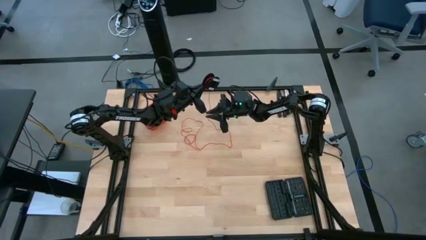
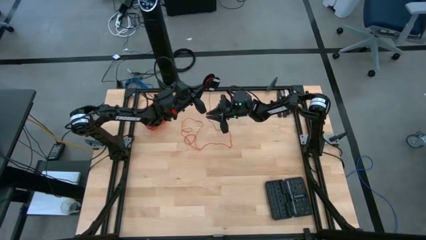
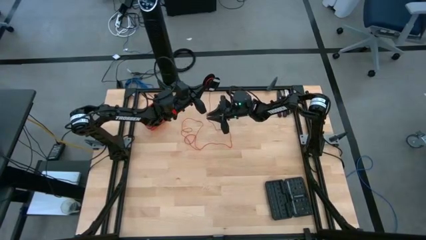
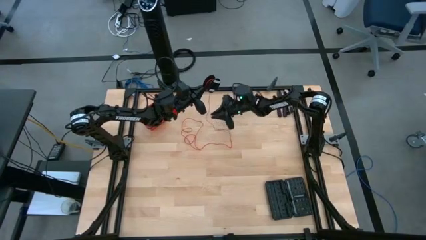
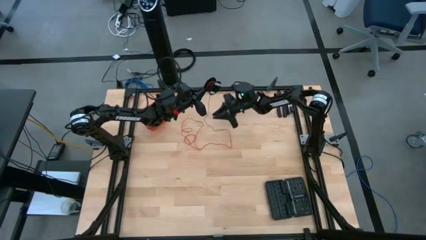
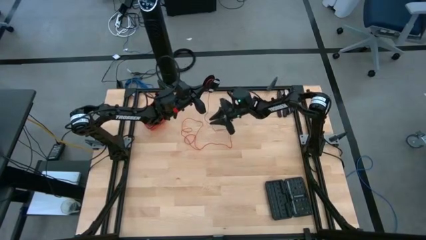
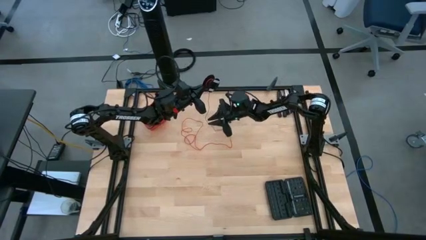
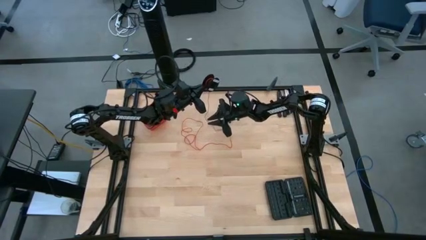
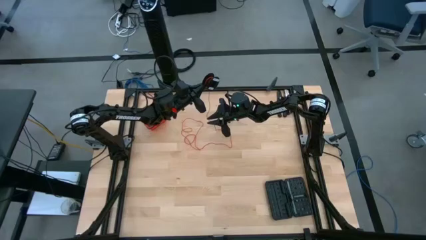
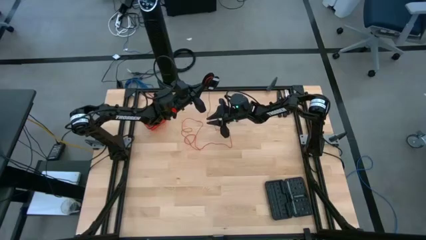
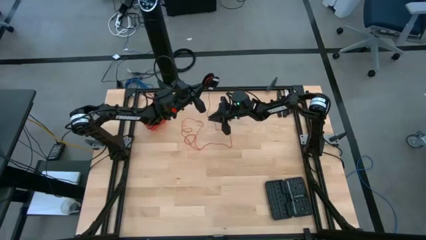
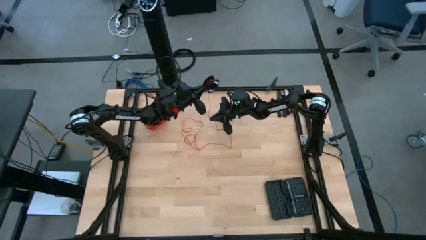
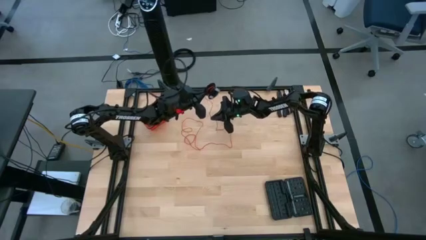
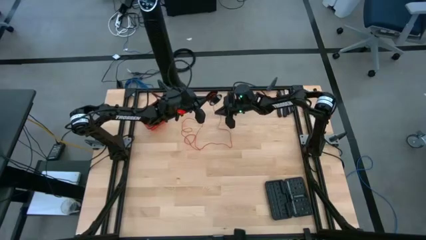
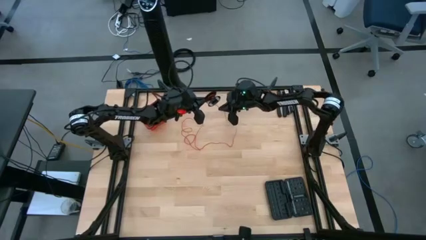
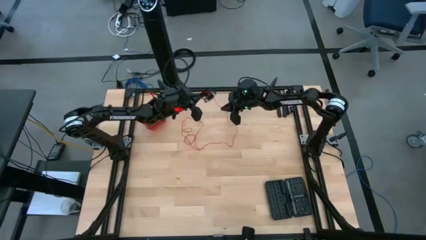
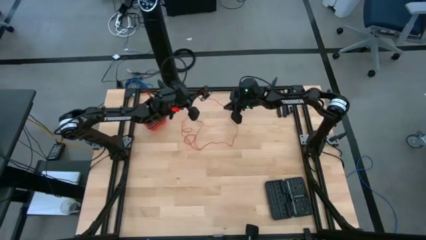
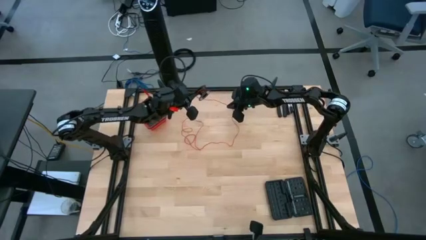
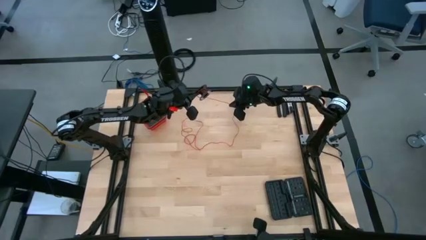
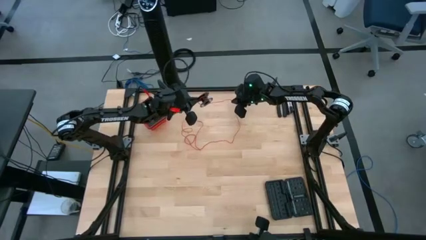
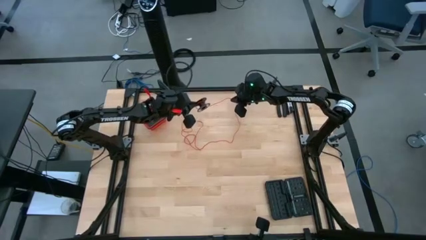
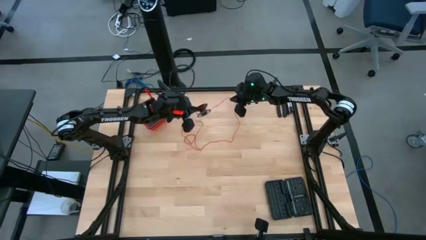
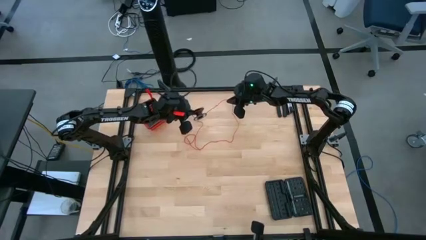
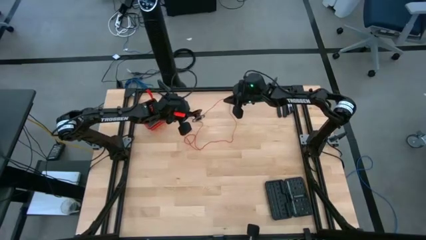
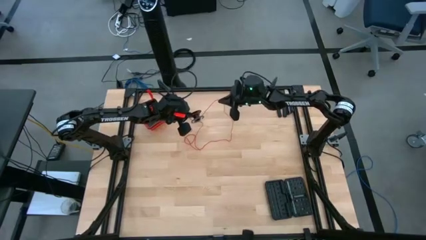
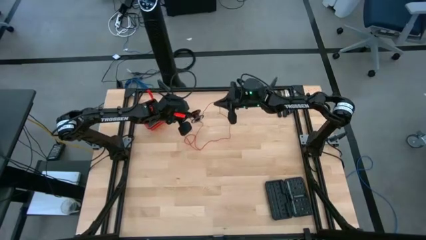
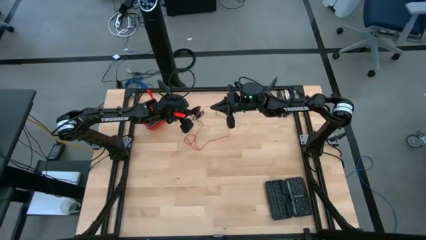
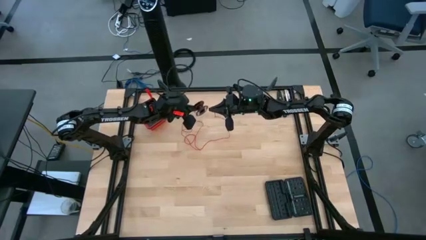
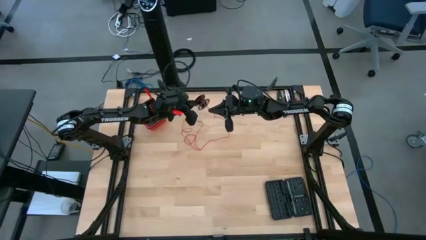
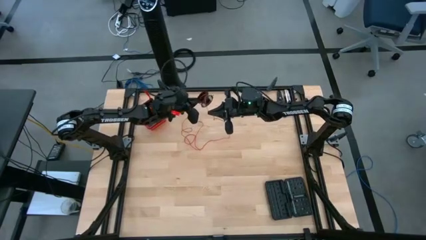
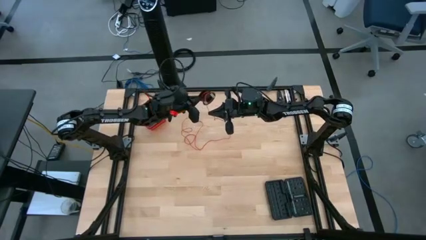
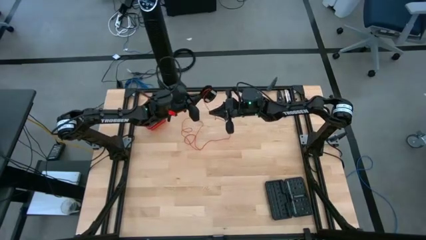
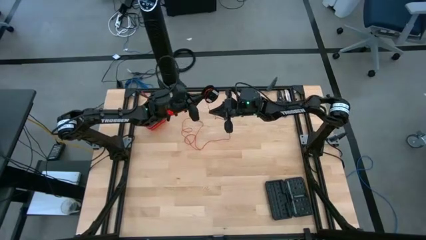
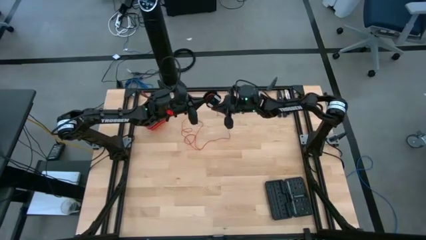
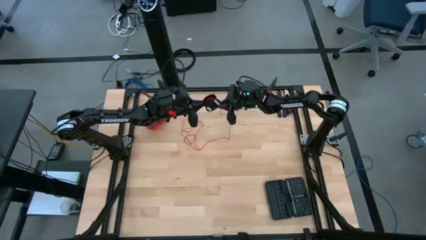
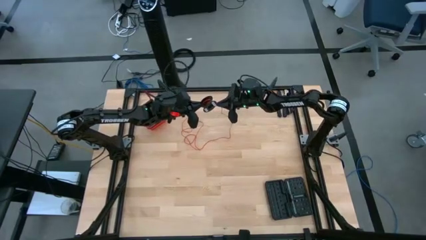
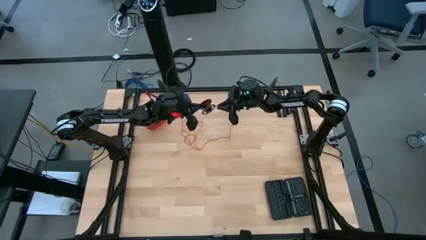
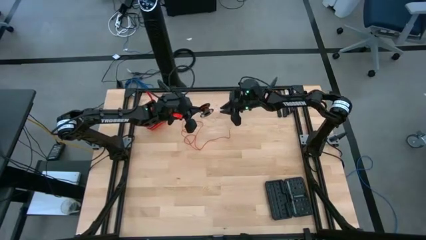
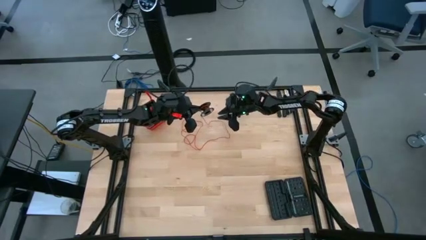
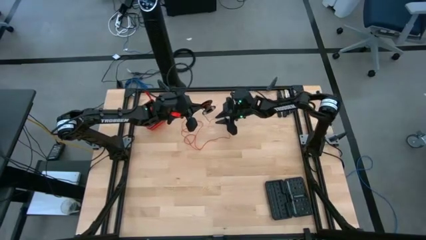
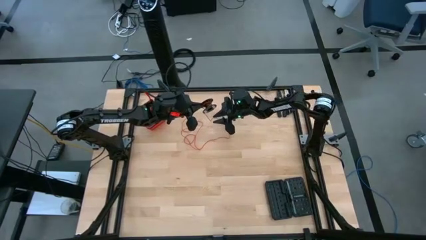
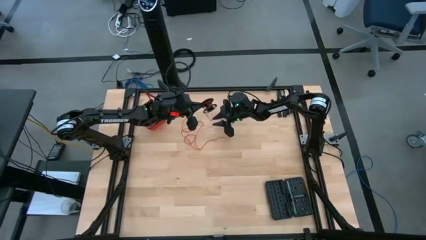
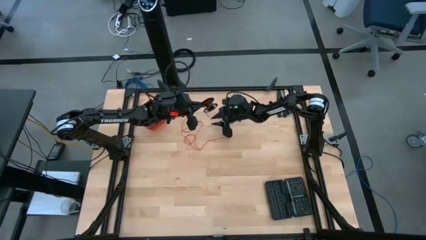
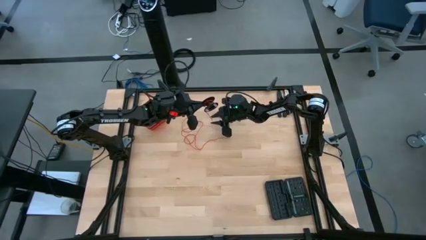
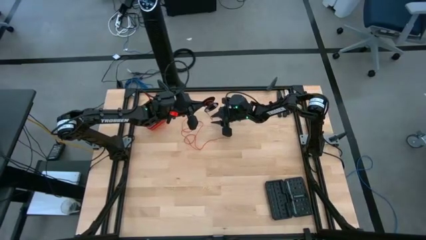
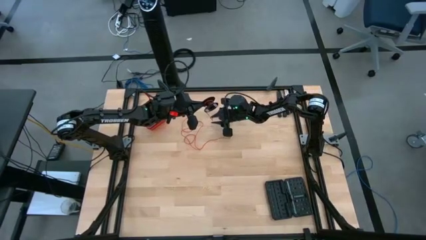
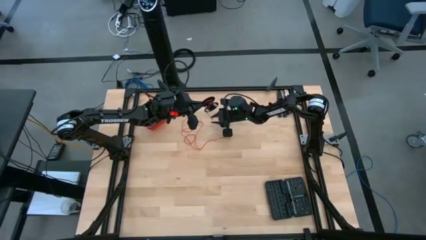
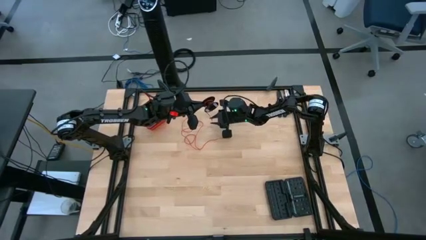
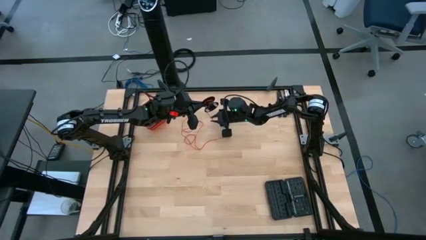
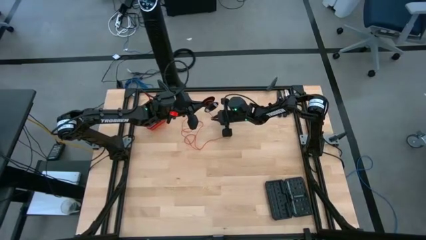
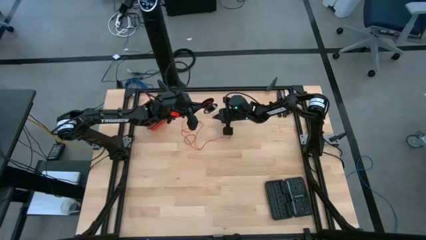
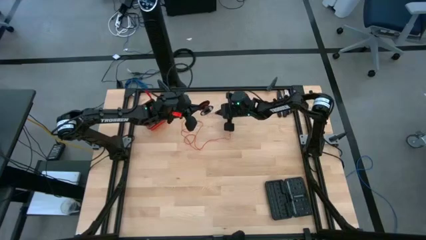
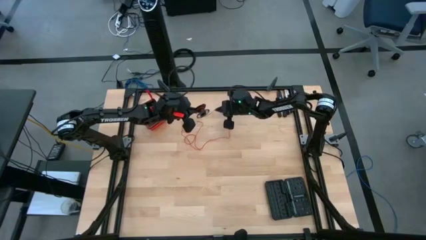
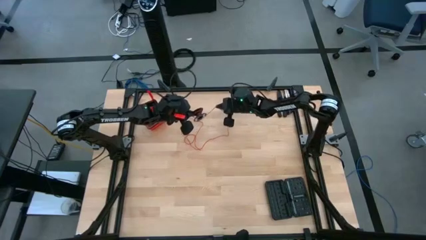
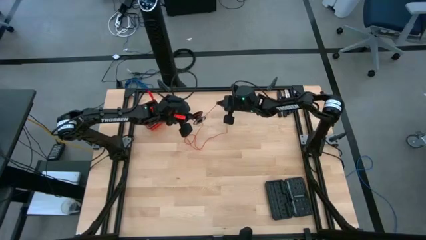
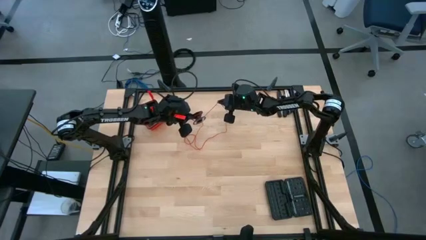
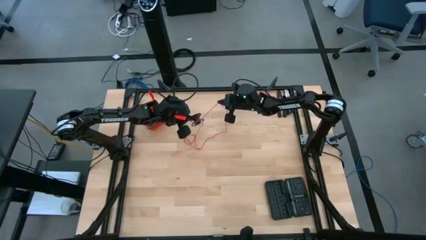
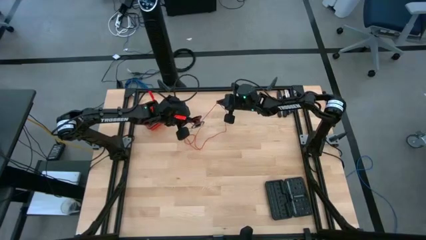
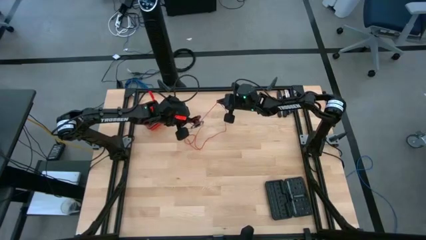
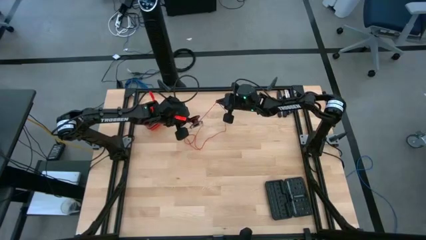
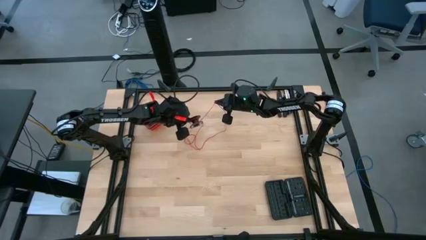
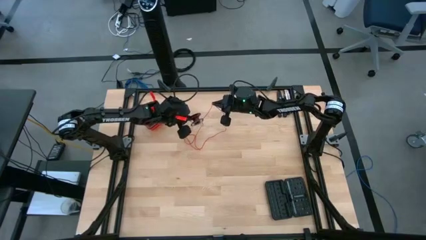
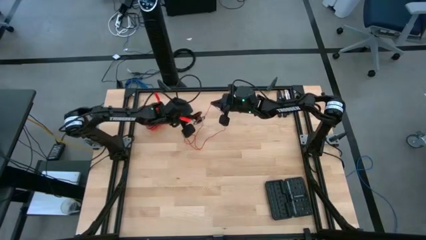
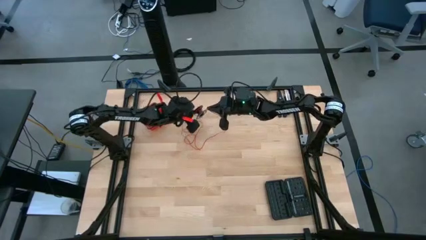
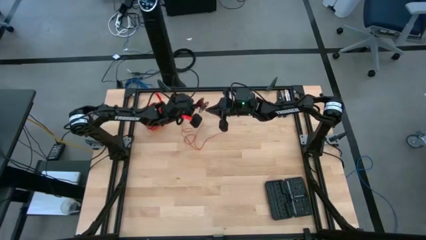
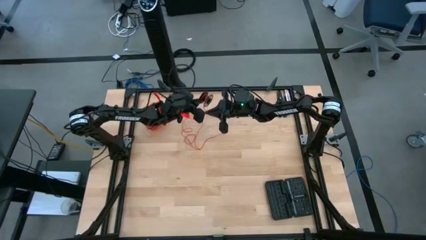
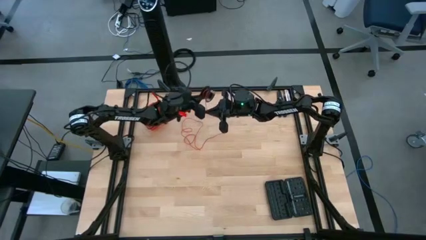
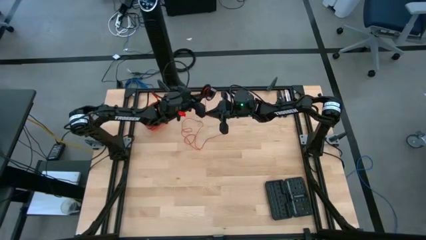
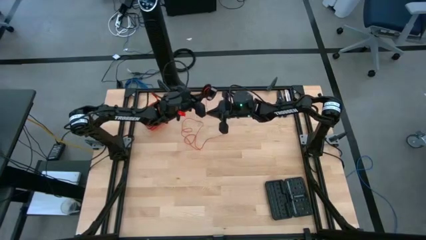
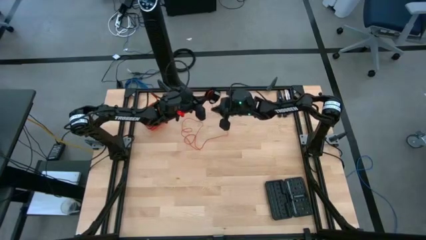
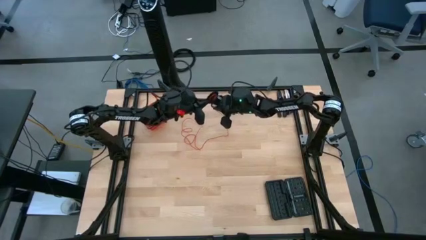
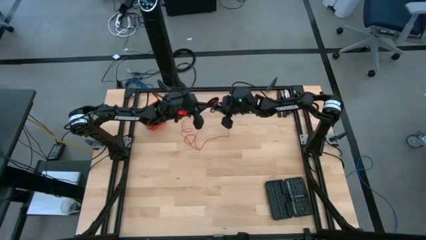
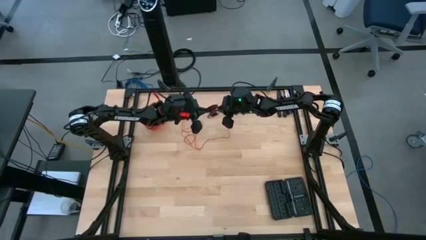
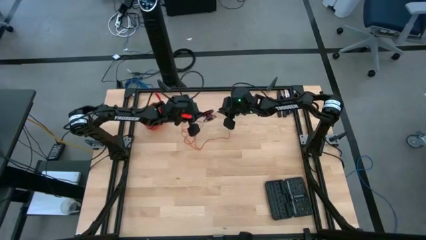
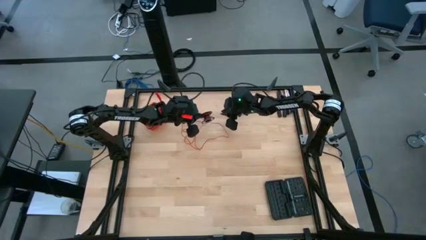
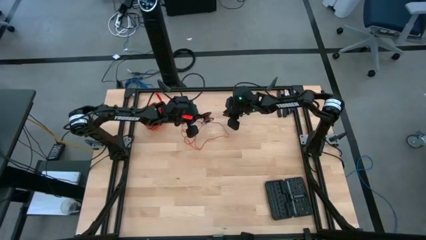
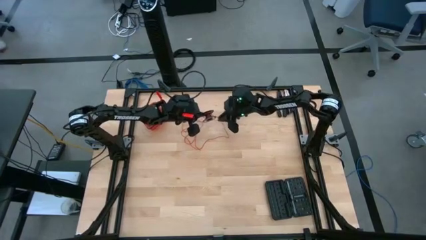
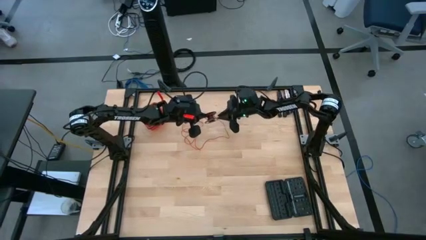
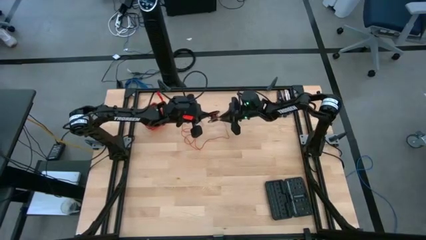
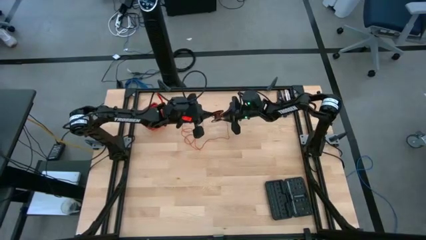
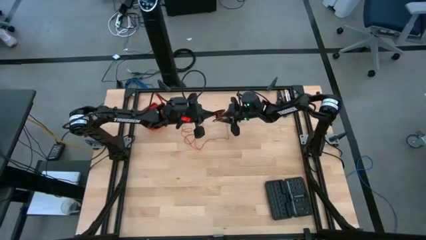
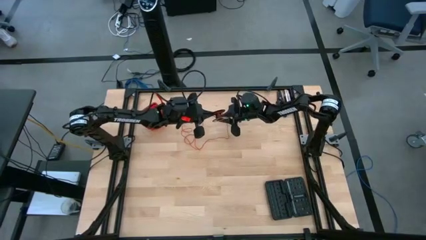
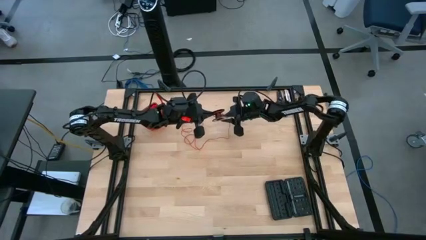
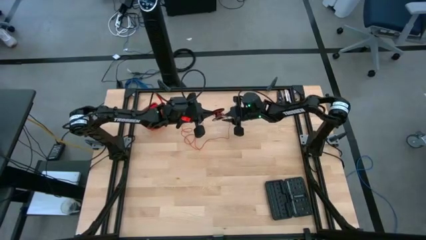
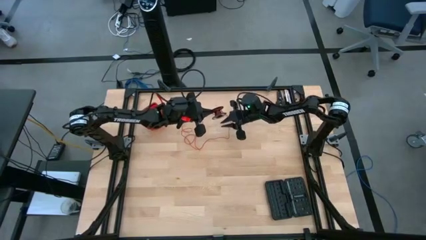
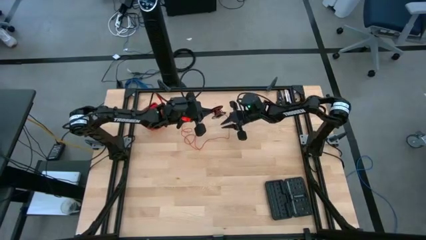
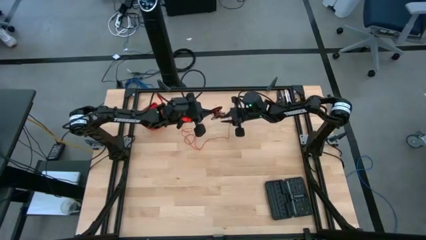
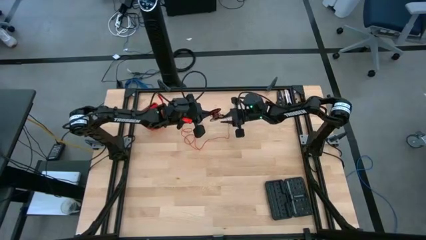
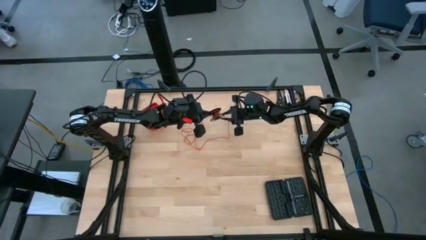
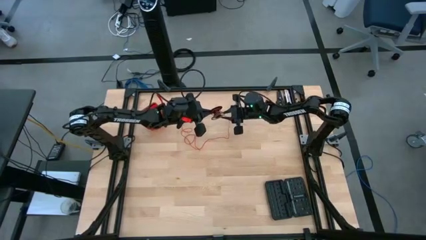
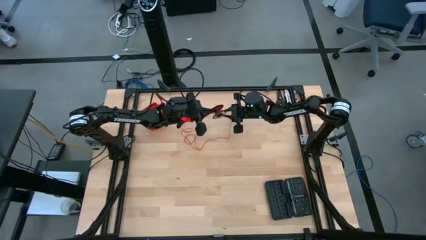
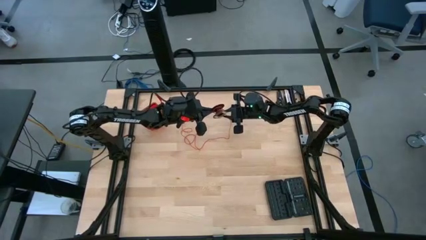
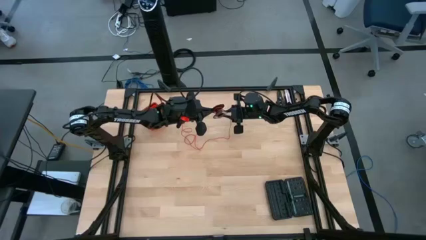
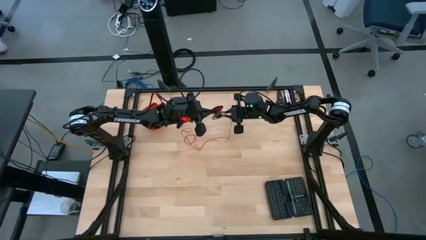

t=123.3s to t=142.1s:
Task: Coil cords
Coil the wire to the spool
